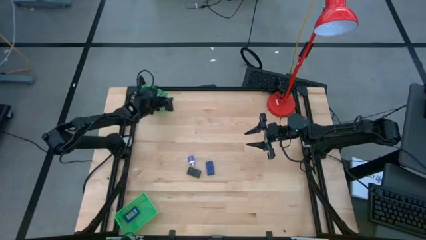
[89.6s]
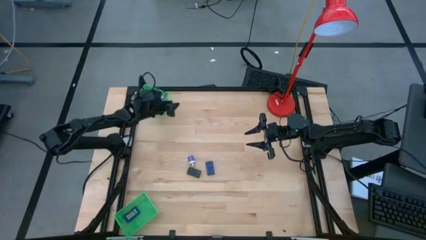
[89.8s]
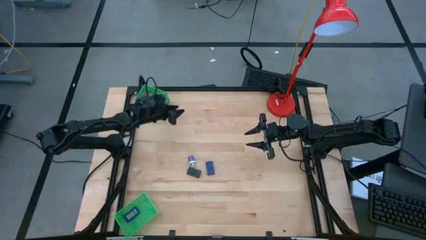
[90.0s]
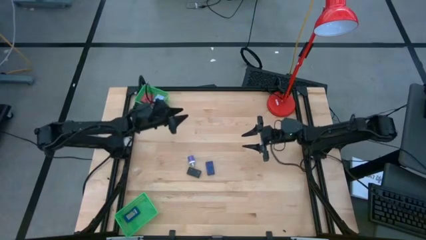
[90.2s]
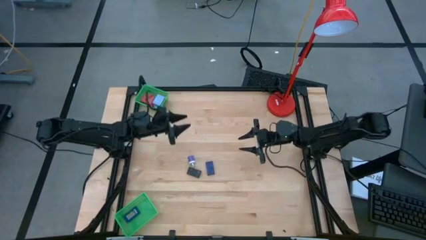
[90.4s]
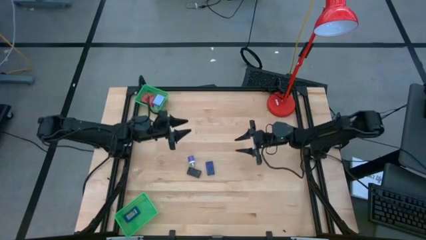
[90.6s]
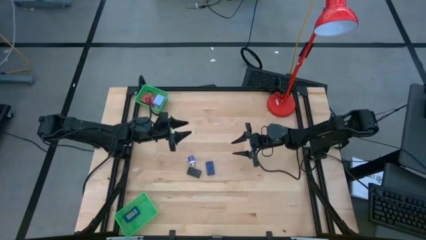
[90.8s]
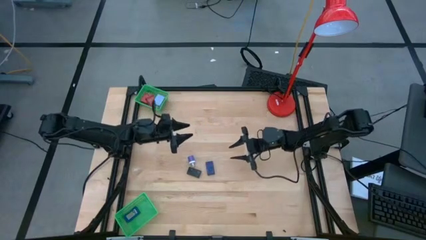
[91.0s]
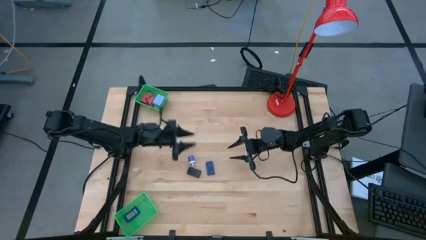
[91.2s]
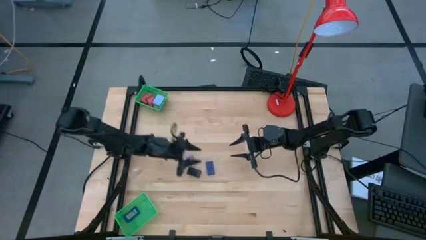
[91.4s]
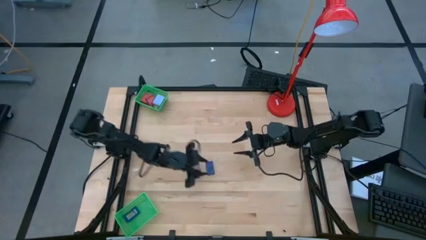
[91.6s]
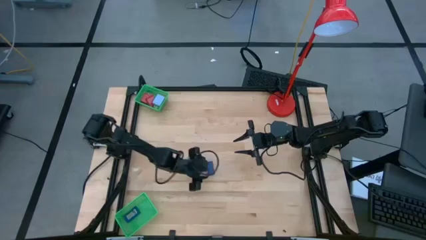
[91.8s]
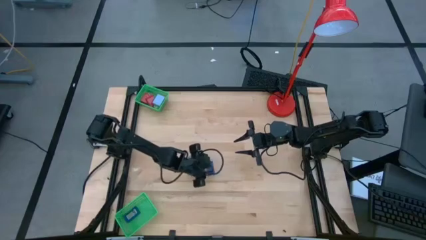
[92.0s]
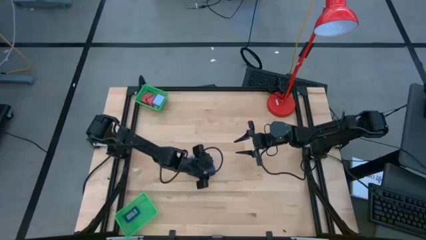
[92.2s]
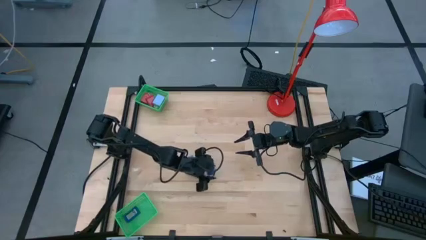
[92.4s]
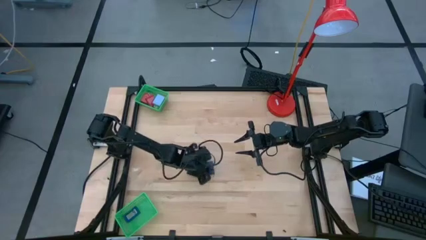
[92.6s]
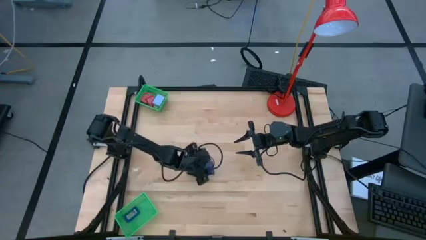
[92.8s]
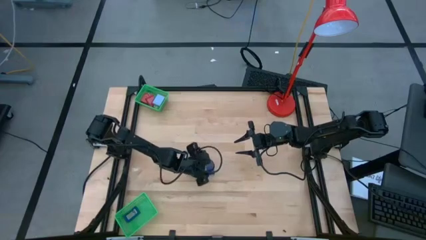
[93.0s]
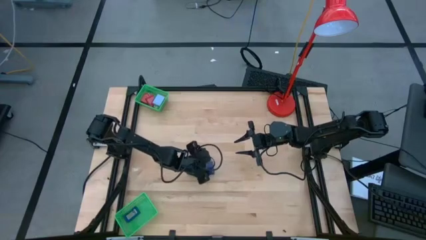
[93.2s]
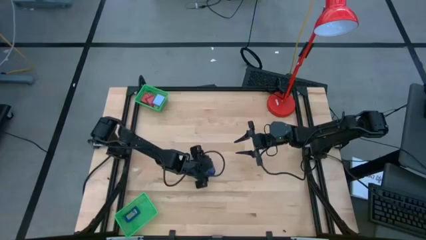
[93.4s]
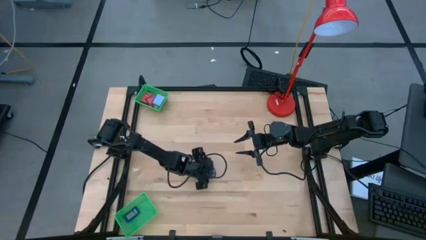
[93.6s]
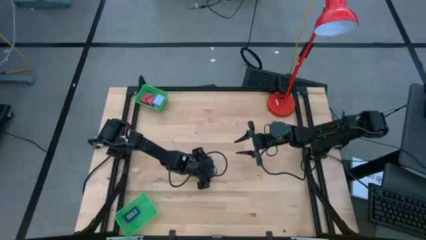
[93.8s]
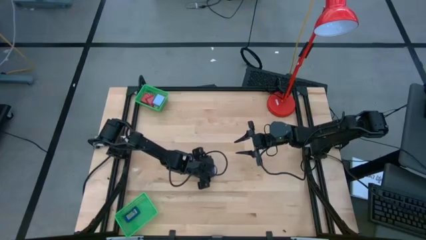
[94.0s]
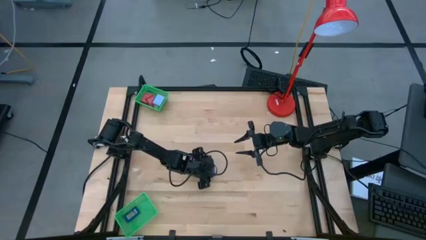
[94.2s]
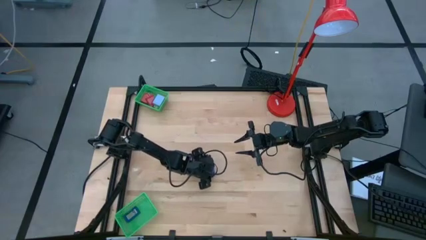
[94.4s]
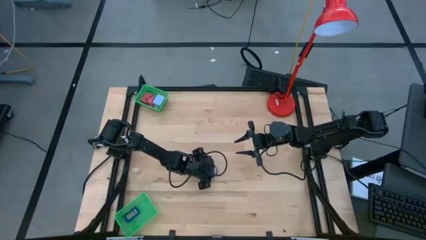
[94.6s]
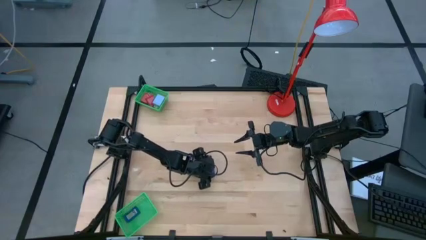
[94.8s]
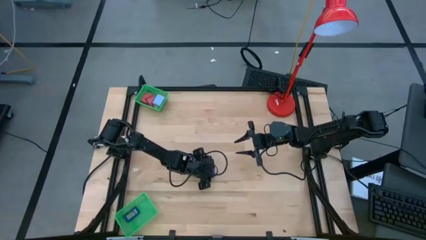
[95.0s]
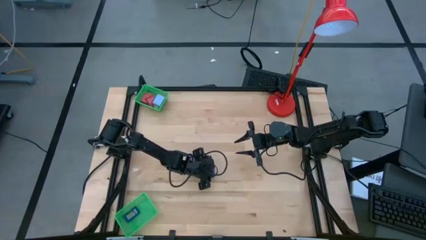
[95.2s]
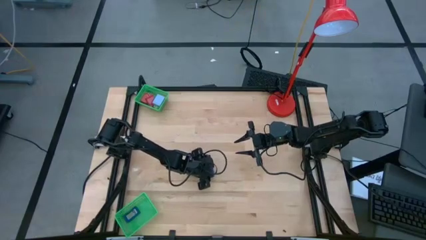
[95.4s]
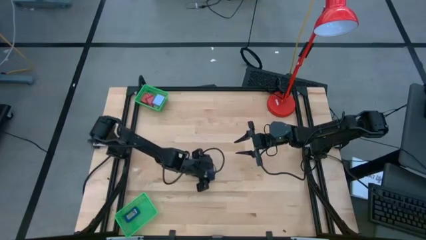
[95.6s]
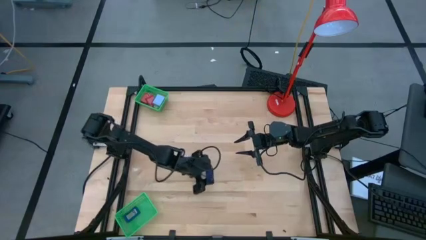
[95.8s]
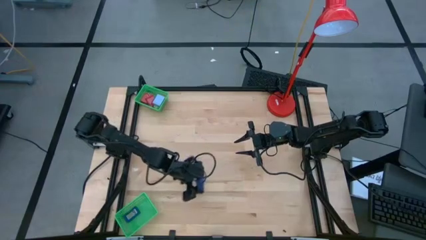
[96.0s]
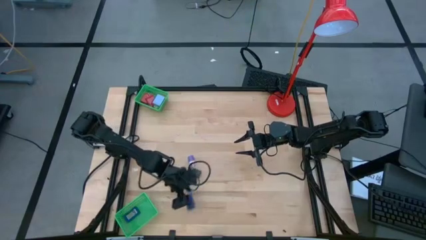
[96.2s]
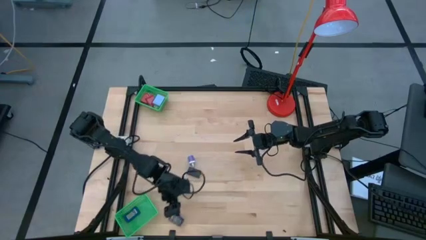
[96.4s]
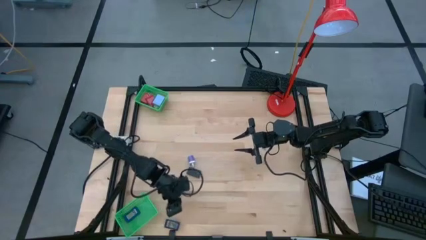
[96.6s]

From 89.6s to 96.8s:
Task: Pick & Place Office items
Put the blue digital timer into the bottom green basket

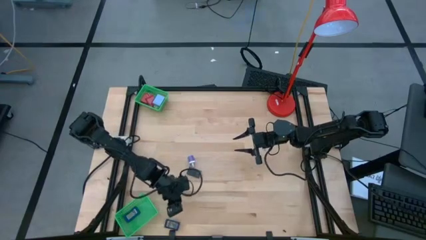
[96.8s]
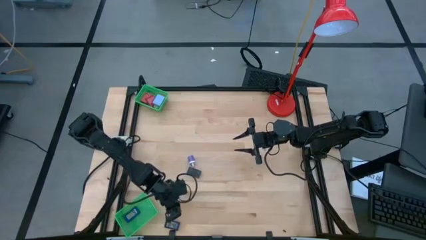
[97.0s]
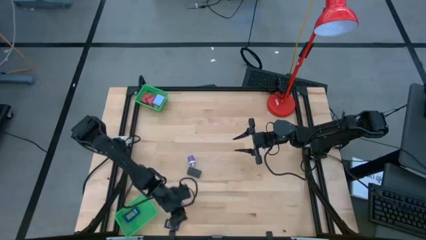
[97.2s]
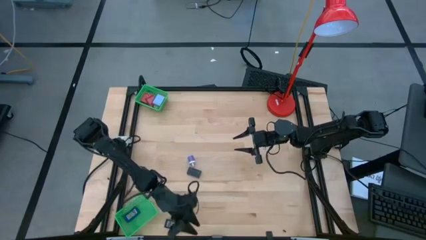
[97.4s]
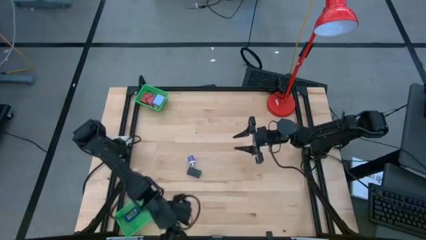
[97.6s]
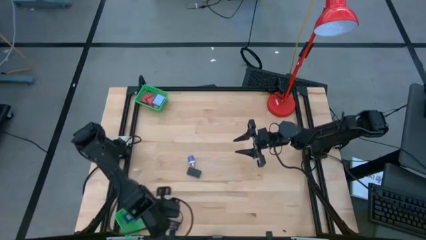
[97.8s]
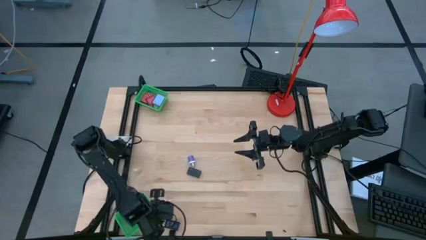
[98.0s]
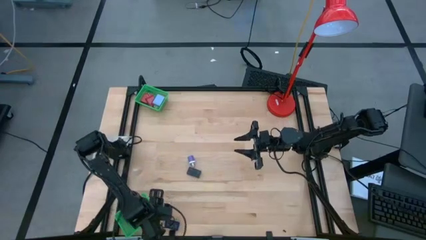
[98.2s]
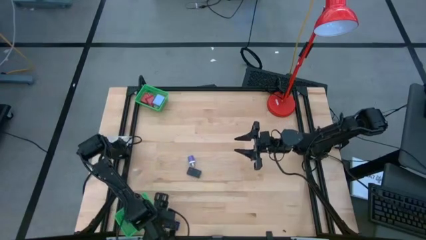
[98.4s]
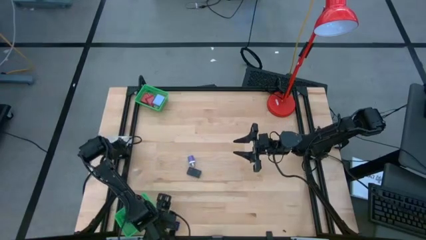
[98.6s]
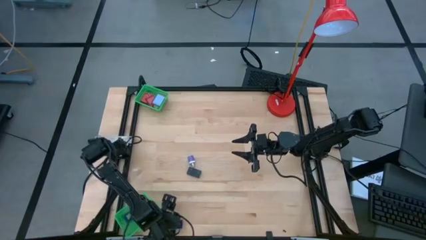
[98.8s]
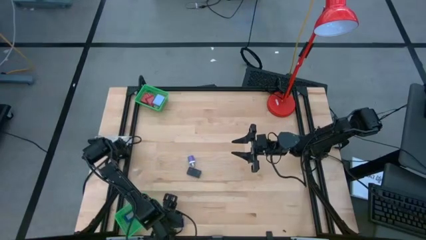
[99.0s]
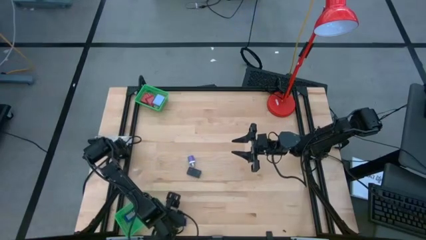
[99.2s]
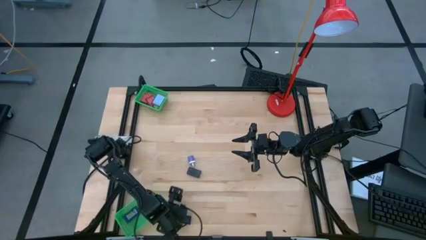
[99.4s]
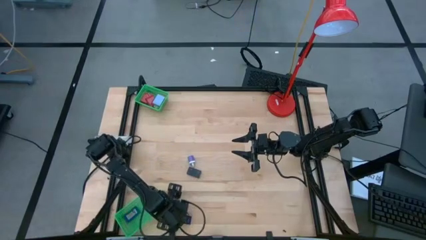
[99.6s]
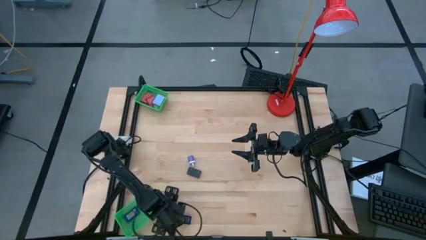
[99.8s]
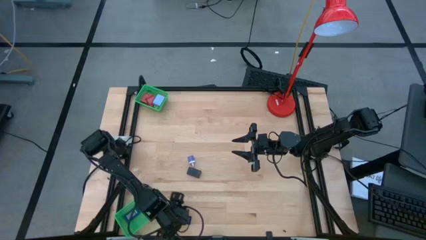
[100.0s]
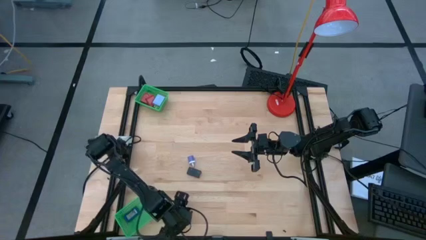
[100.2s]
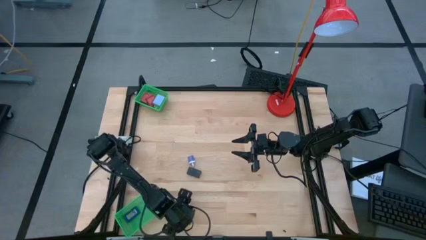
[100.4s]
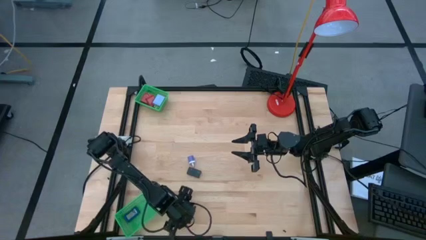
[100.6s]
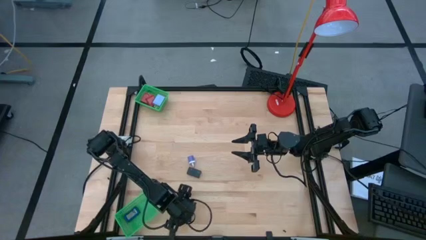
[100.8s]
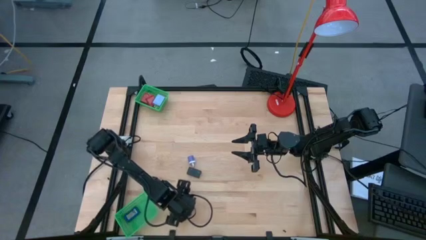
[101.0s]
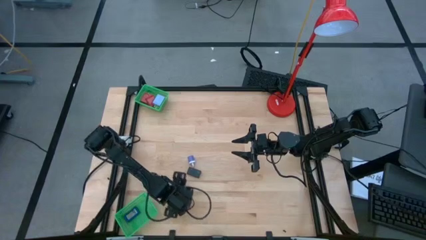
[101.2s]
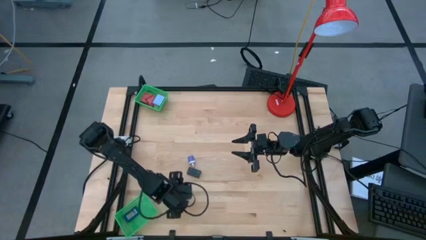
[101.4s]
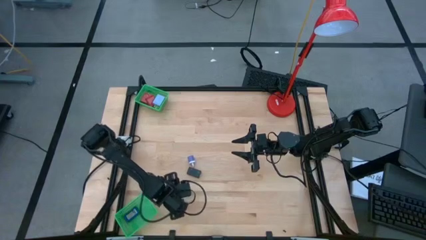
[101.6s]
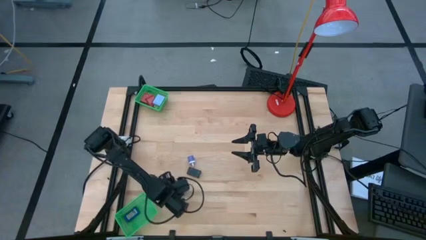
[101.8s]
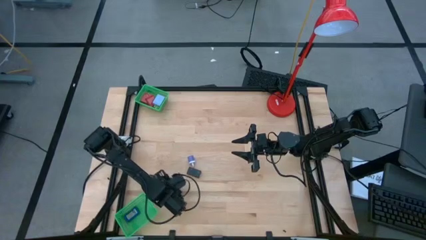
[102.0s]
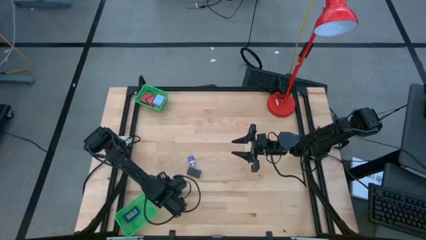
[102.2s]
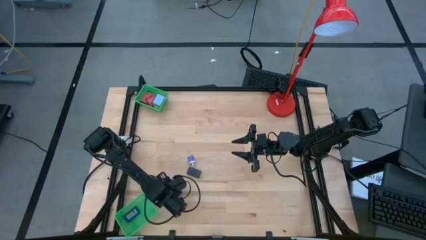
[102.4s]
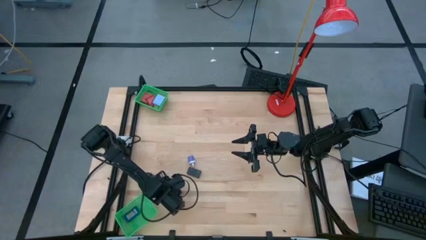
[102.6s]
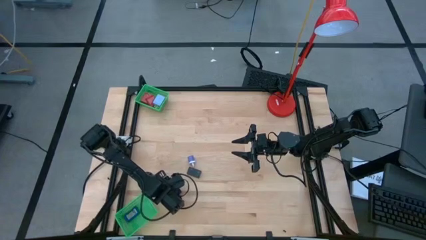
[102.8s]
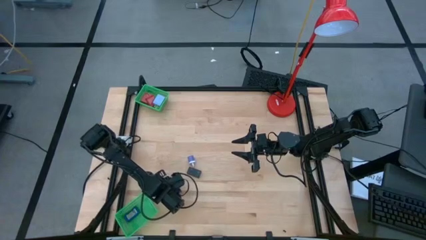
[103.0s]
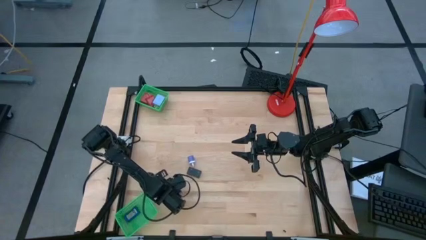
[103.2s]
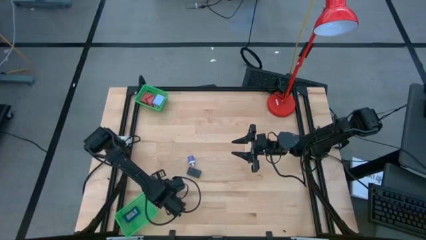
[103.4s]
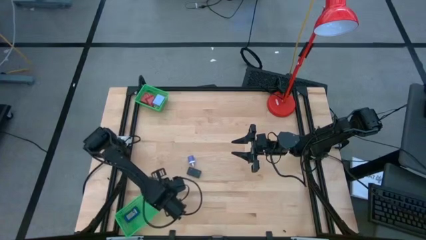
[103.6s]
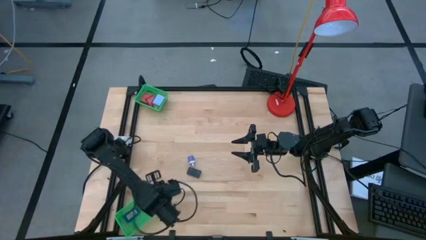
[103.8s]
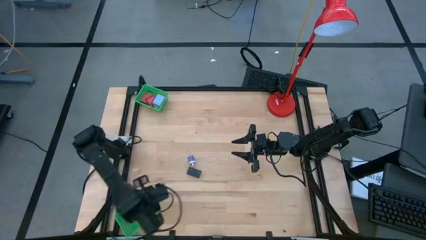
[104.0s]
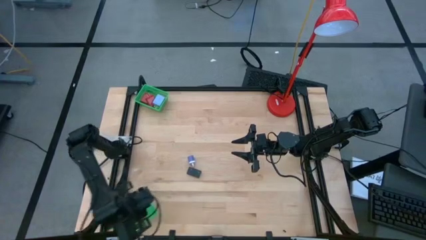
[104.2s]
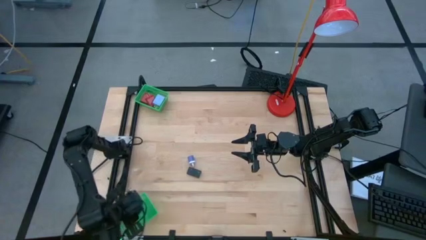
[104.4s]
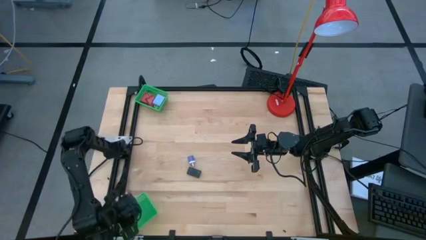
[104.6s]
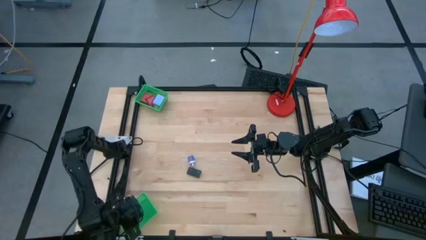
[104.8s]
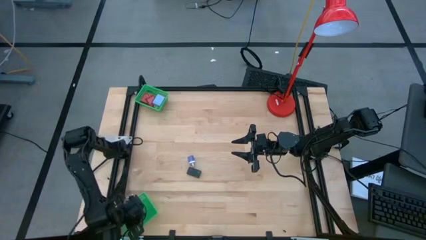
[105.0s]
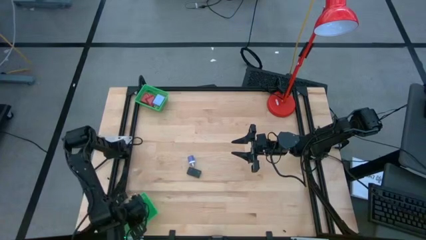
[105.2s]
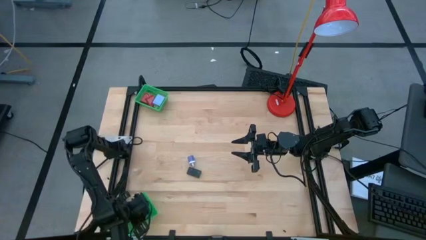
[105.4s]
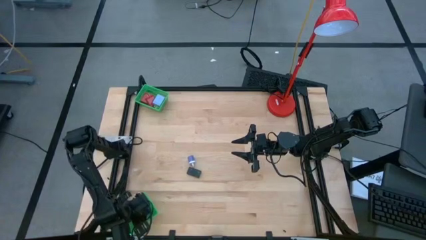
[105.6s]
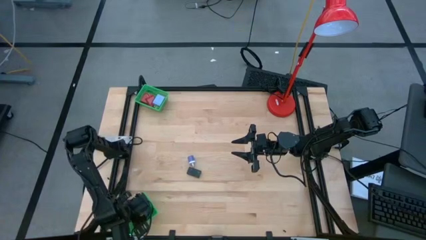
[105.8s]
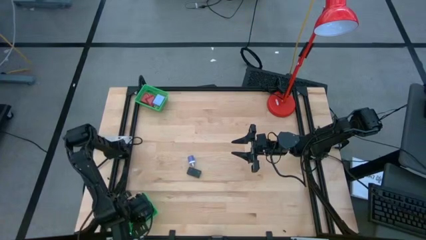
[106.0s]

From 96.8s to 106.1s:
Put the blue digital timer into the bottom green basket
